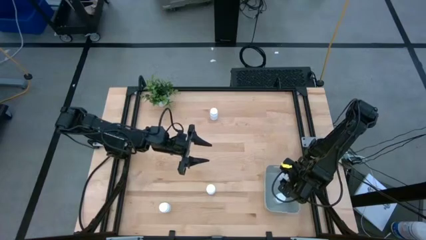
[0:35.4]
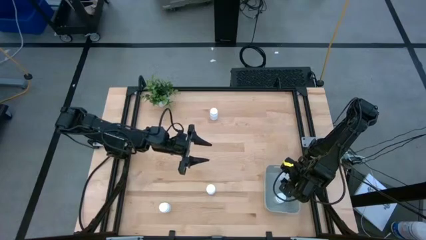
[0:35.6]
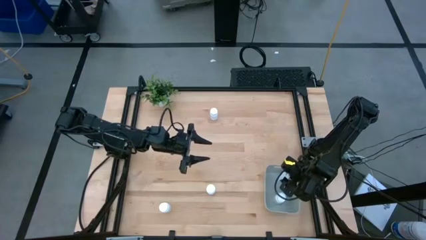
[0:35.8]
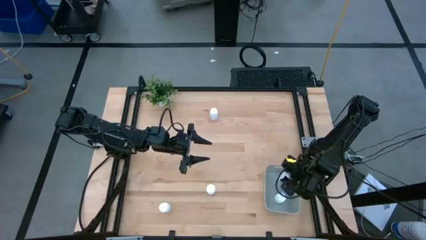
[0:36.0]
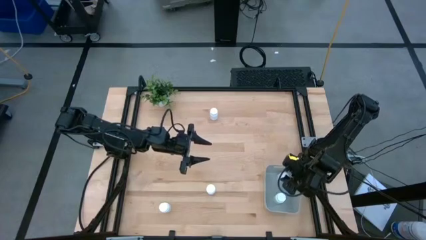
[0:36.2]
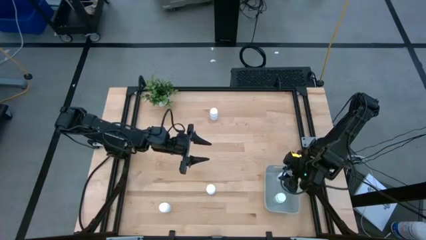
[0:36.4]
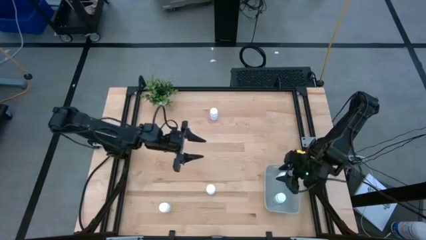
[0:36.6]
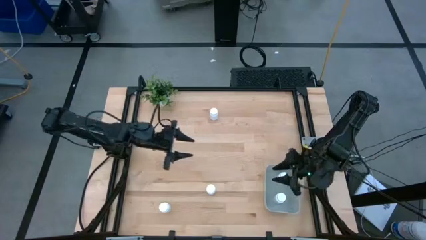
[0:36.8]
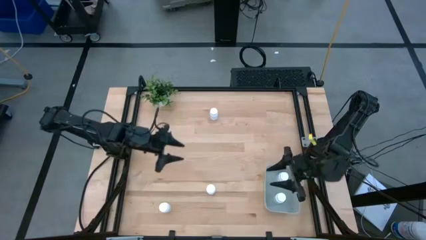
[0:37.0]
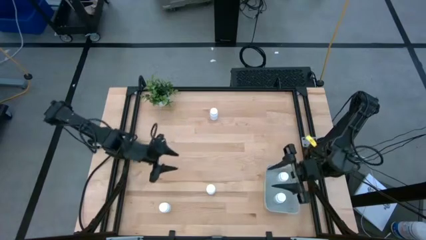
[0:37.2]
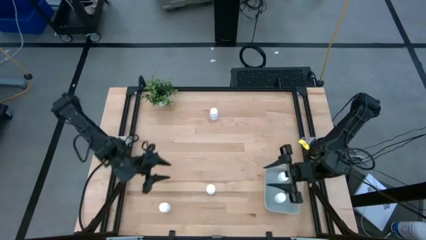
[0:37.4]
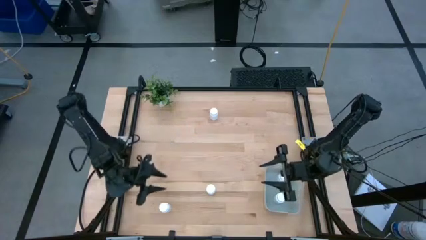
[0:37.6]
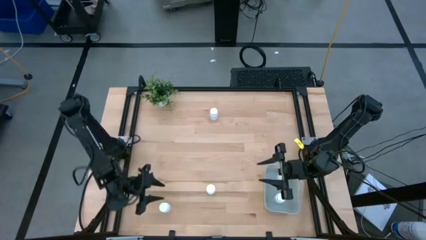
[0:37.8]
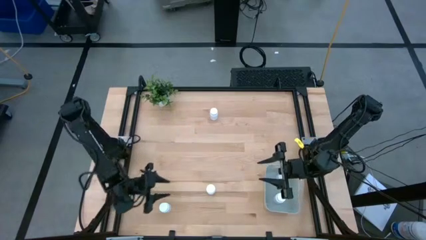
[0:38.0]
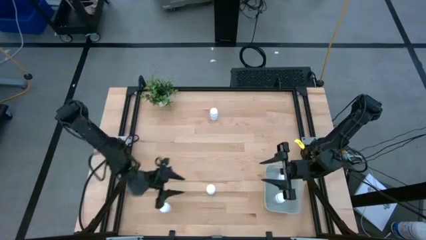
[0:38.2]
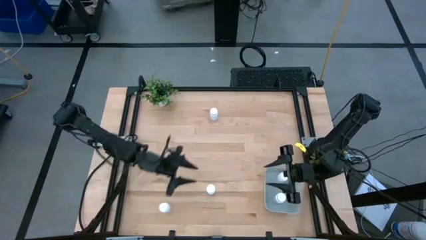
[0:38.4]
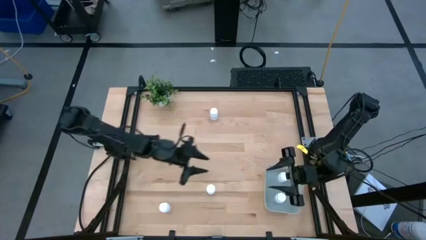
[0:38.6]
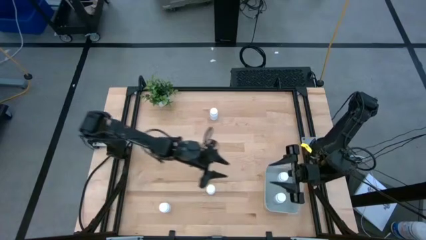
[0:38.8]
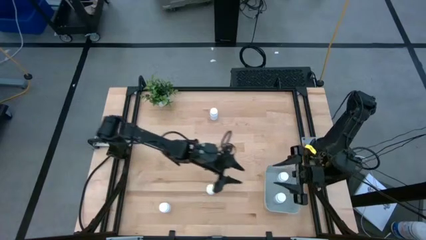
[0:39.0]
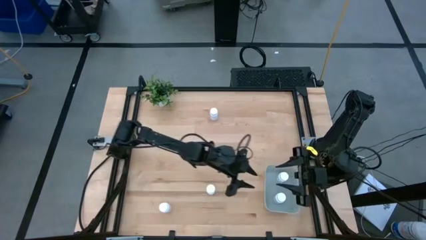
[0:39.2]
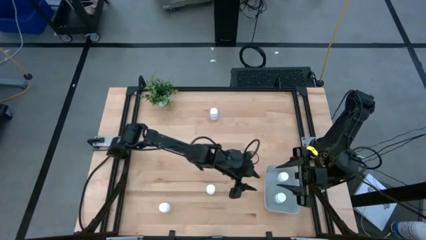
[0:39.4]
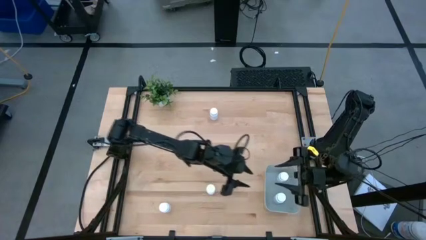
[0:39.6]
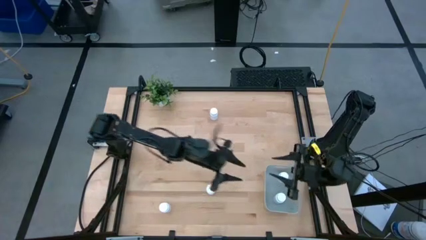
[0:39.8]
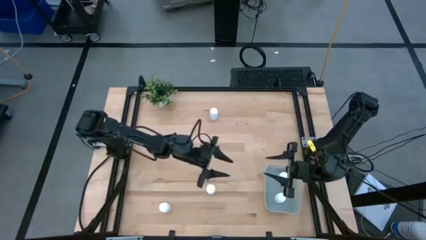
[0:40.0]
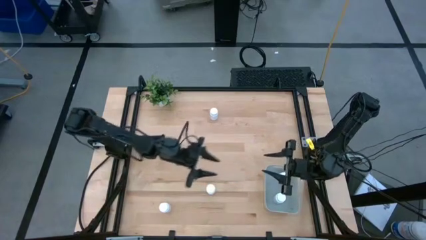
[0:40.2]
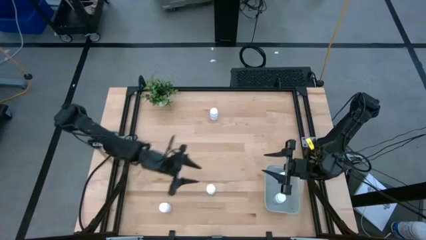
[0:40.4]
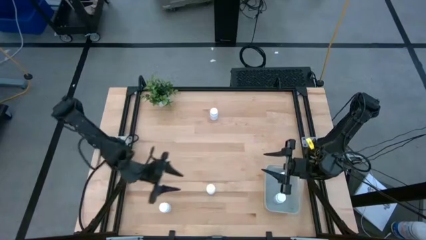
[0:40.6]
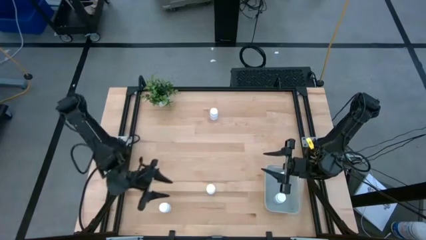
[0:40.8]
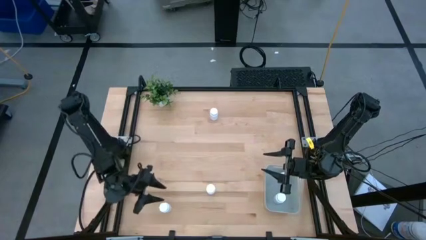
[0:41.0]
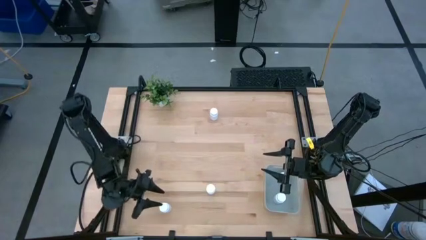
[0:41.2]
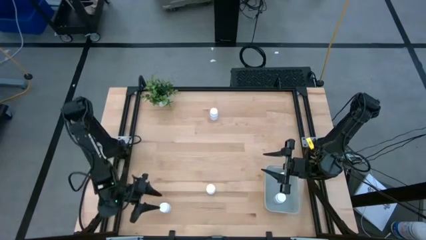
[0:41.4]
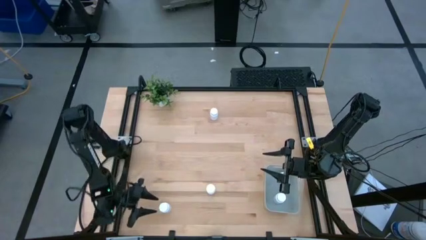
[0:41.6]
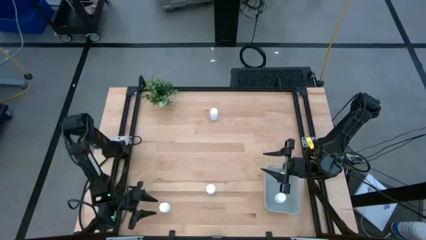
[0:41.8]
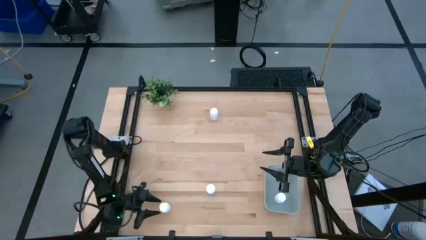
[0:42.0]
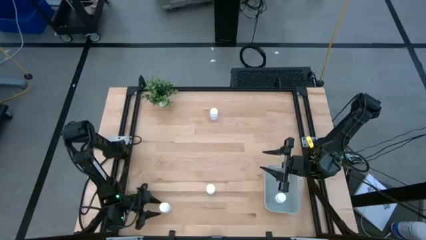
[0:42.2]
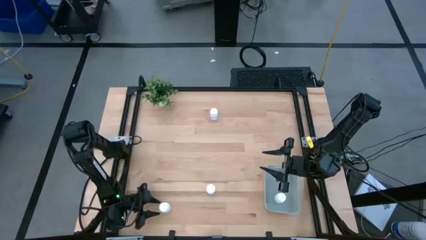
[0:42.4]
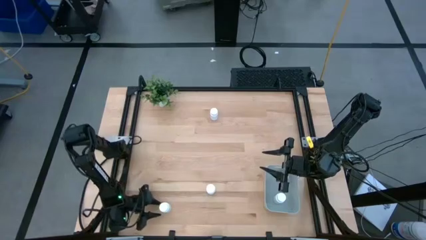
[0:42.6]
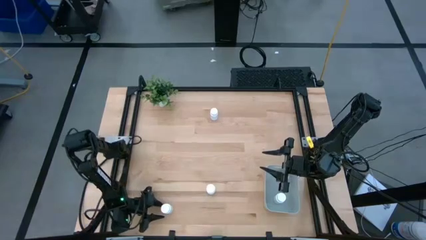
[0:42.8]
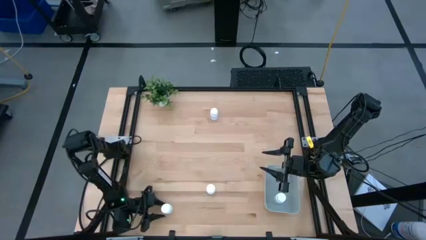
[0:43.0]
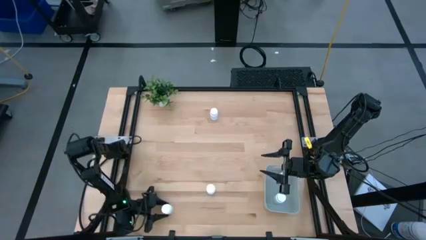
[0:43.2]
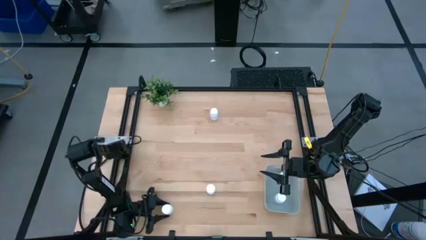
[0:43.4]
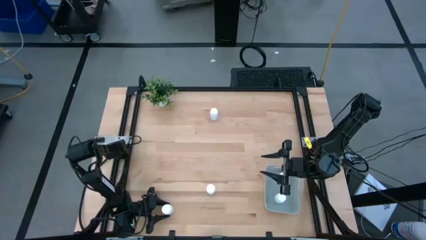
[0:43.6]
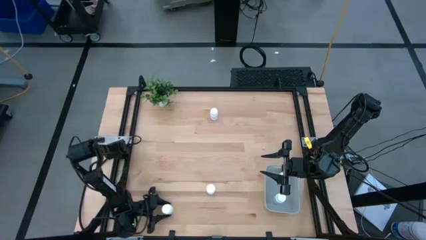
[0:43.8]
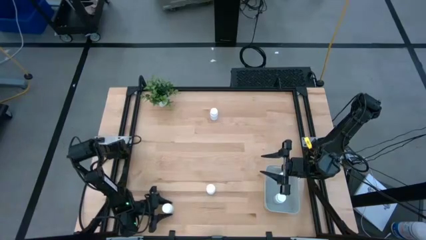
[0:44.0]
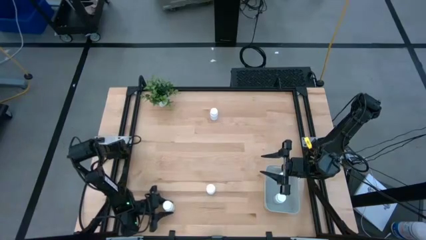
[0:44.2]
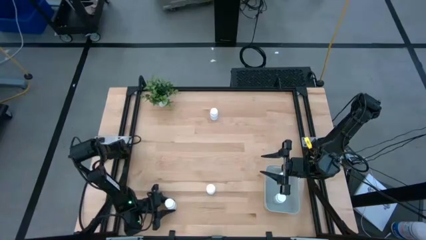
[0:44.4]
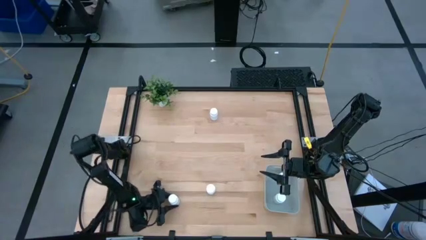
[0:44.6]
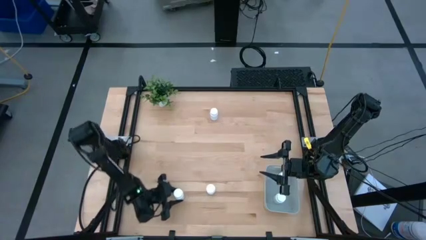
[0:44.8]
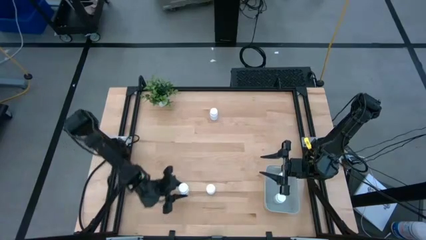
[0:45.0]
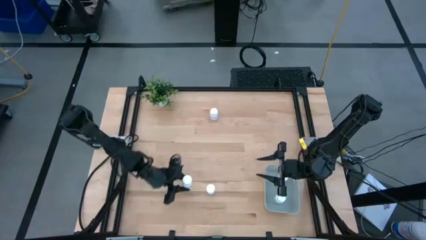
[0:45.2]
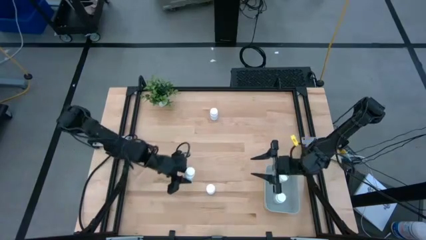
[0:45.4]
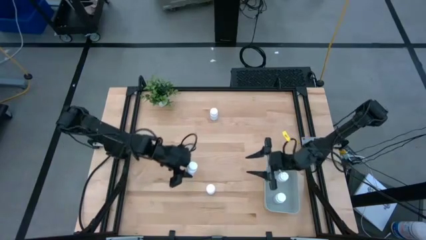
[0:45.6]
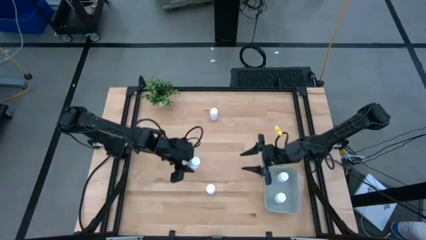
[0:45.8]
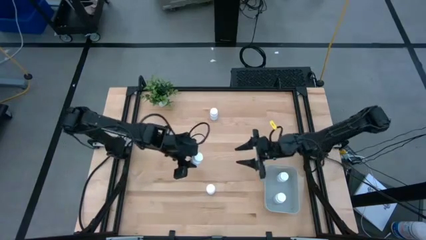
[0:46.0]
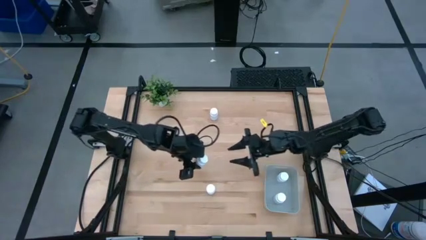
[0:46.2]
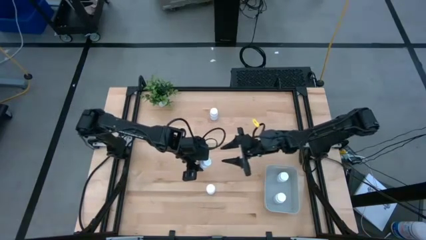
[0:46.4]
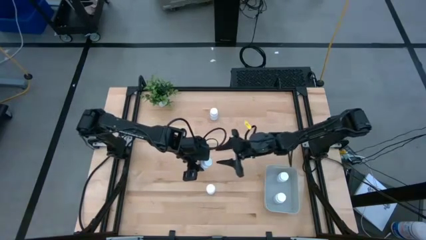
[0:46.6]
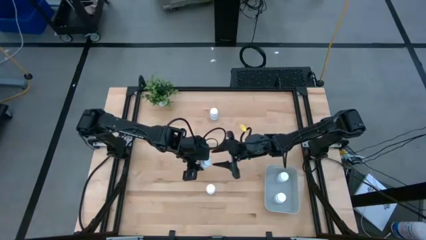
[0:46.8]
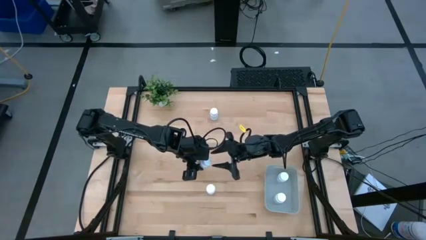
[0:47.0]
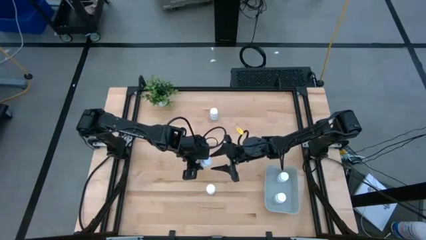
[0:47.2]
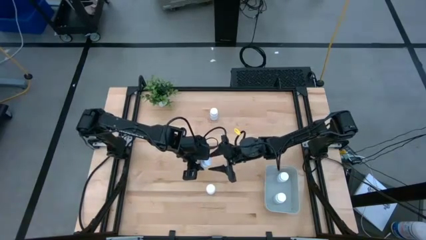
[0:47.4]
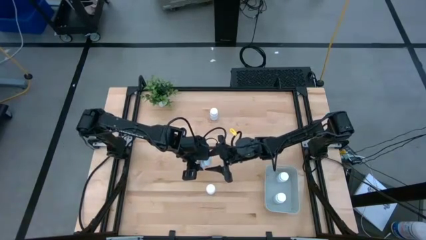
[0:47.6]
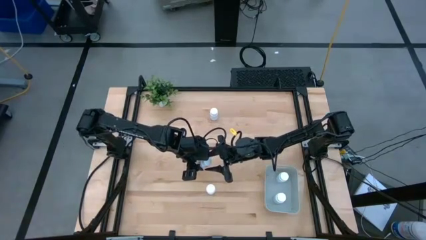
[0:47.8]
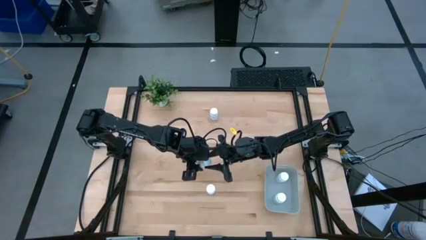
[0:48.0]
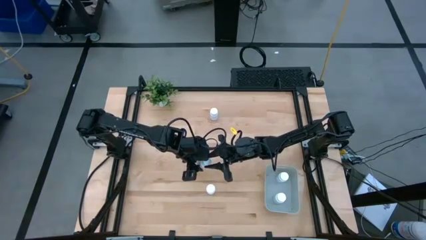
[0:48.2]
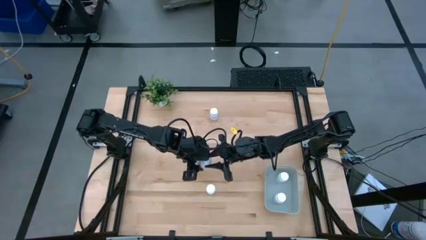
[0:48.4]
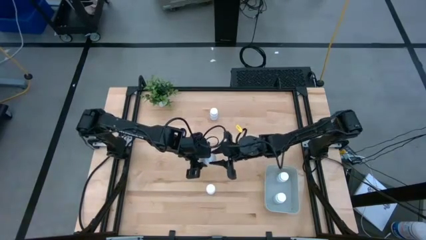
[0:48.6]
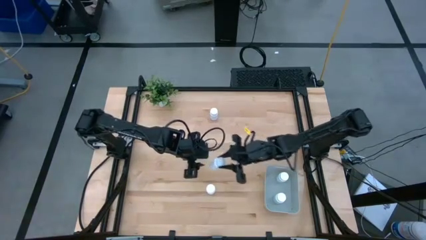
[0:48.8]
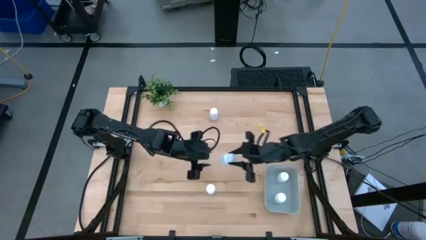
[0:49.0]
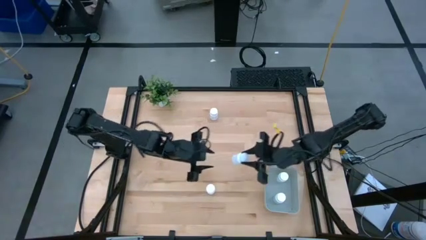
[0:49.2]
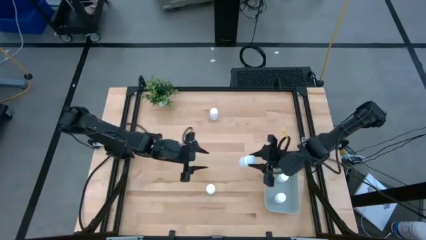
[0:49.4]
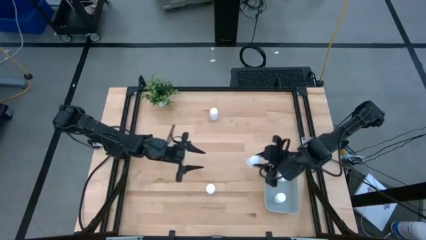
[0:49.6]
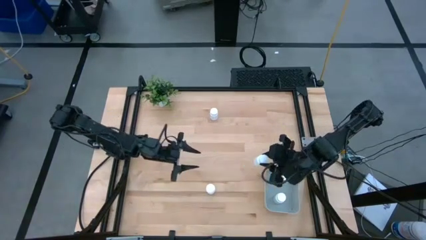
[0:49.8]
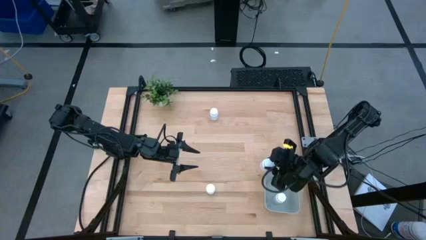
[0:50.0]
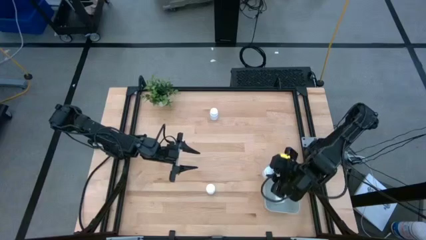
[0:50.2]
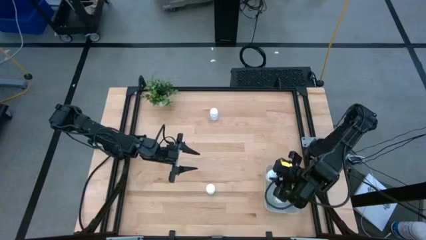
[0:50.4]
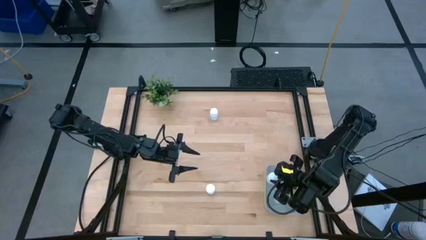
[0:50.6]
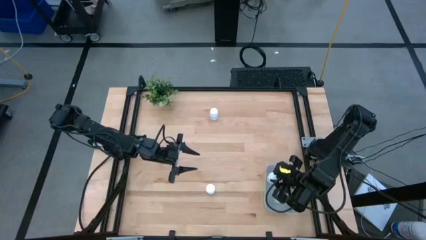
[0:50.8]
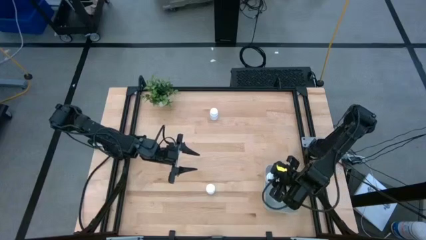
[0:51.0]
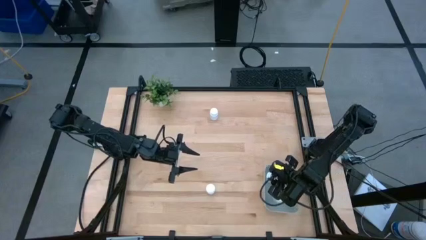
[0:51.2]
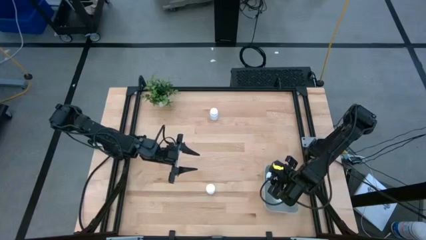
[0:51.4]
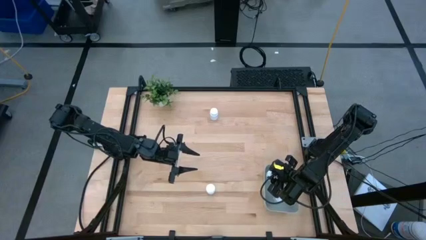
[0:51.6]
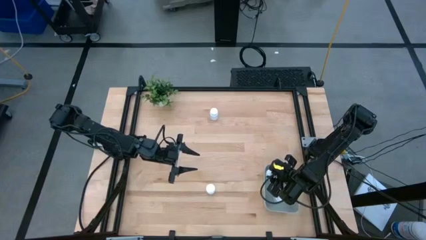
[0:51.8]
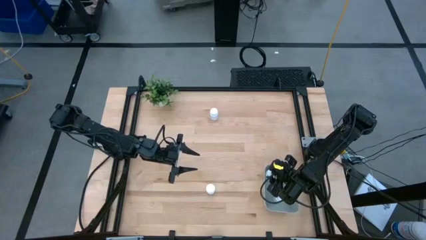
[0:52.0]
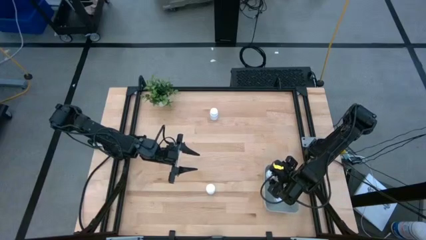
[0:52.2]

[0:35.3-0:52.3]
Task: Pick and place pill bottles into a basket
Put the white pill bottle into the gray bin
